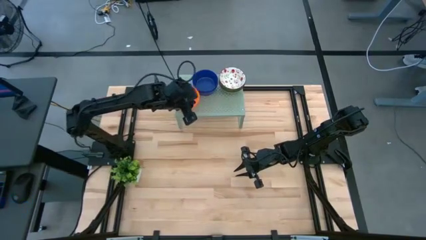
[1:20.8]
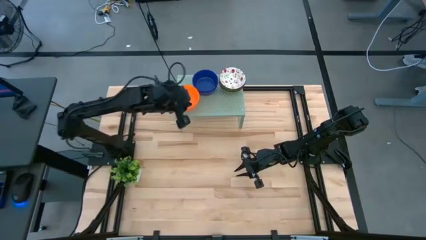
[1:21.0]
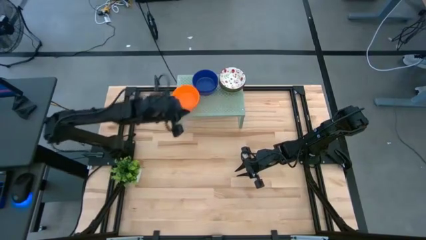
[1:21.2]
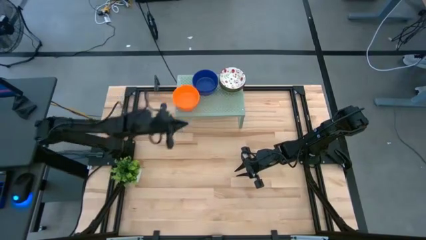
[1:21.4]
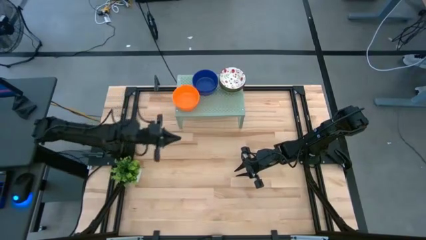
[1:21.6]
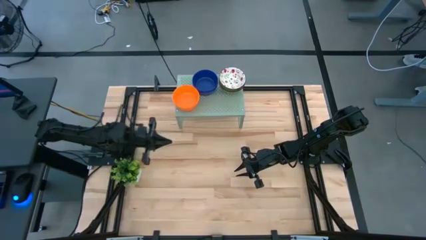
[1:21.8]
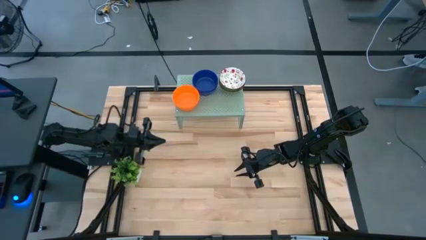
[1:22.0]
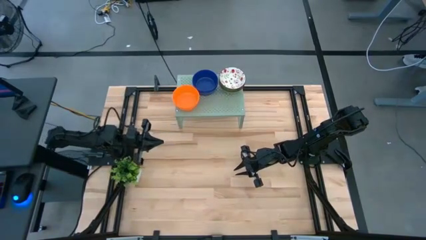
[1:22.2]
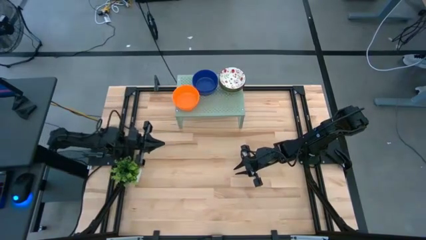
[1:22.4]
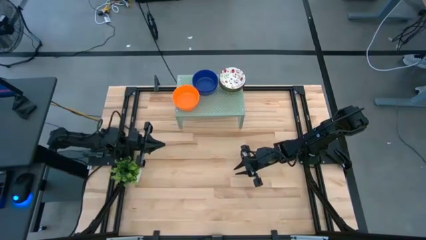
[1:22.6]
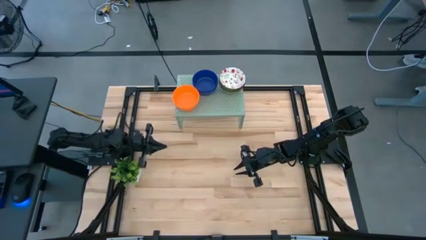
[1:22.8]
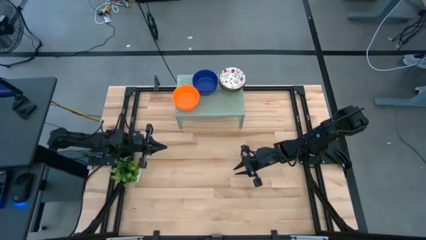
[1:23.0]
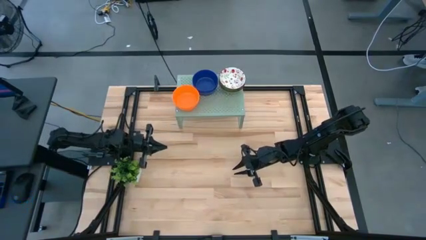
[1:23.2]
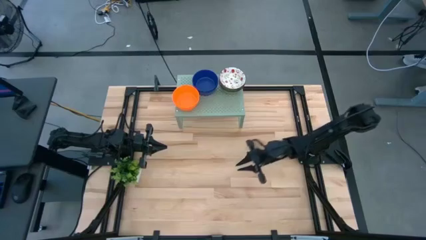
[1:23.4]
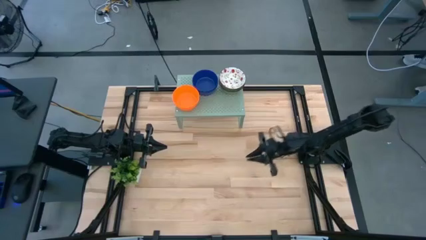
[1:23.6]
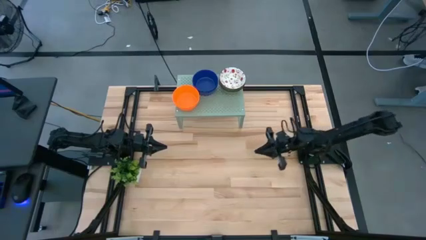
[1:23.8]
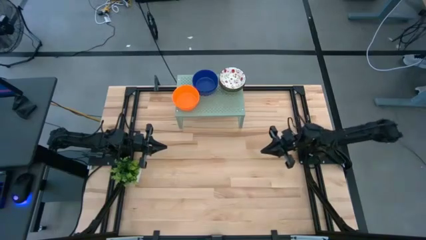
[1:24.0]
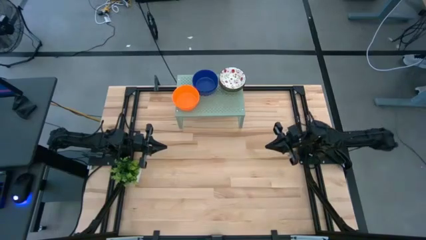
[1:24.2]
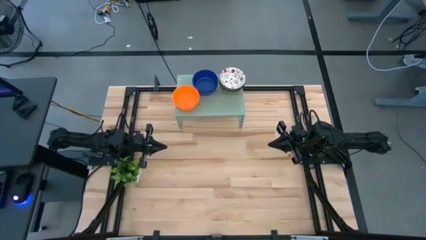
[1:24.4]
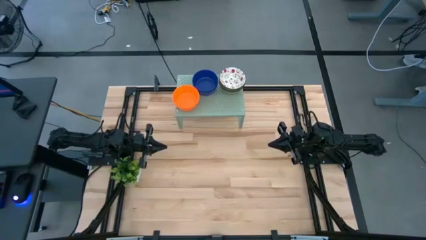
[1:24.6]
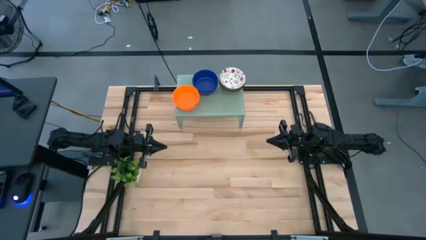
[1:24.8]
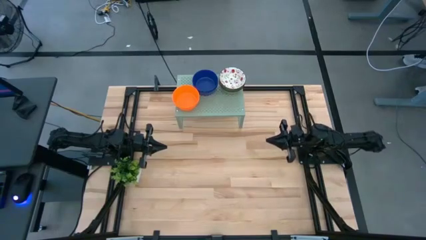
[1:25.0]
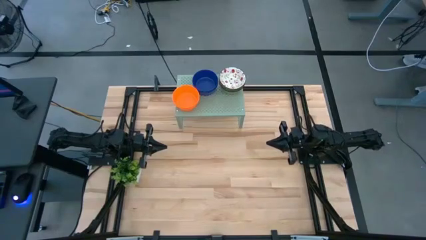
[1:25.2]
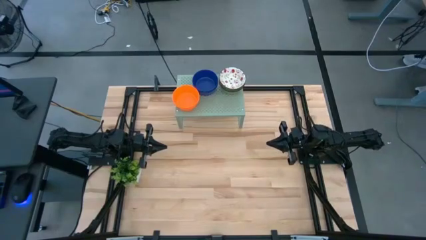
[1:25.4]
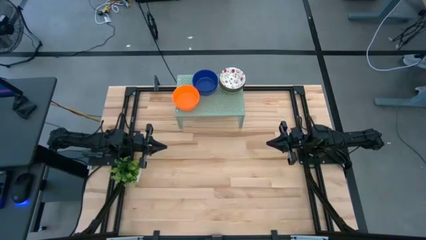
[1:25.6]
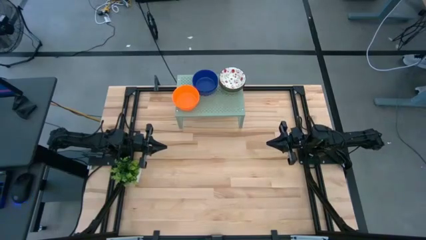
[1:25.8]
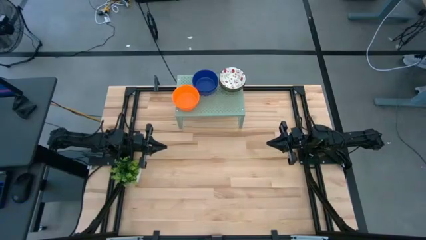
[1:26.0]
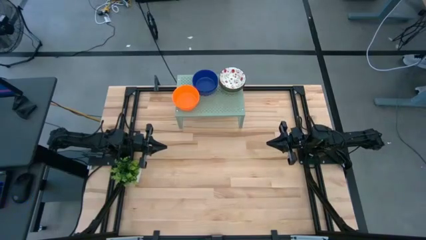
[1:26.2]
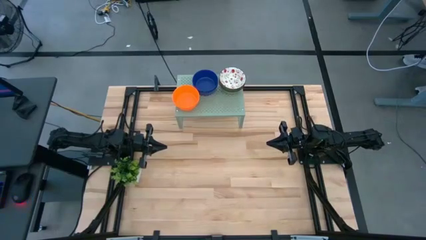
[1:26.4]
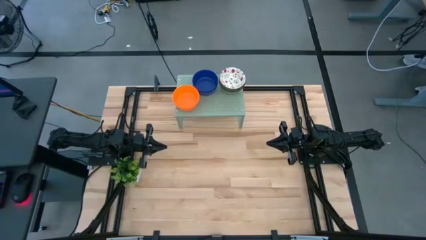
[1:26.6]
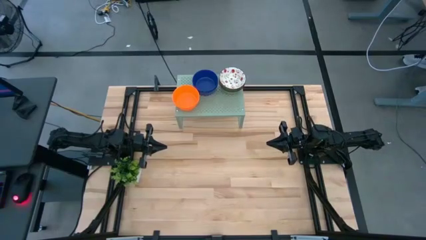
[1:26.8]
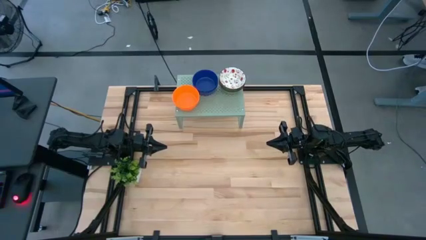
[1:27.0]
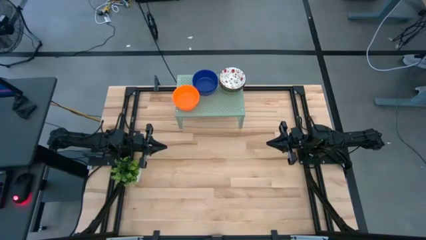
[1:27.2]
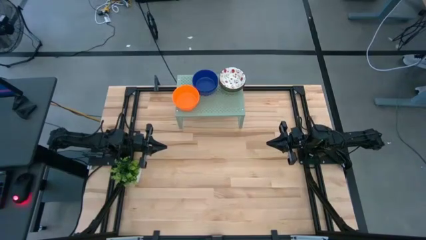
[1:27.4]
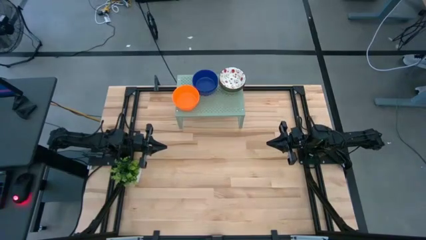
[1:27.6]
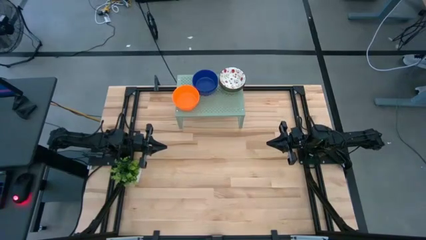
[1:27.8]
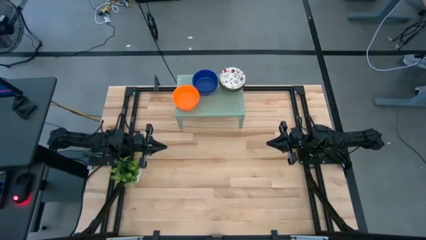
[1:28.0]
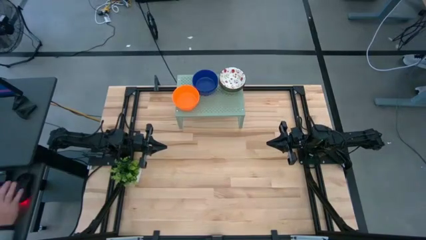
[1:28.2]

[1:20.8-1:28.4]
Task: Pick & Place Mini bowls
Return to Home Position

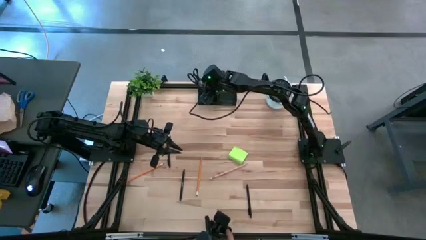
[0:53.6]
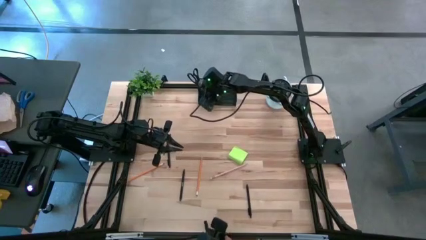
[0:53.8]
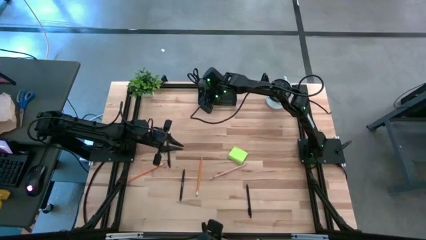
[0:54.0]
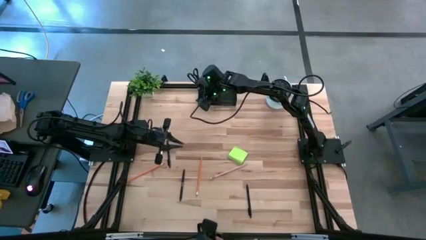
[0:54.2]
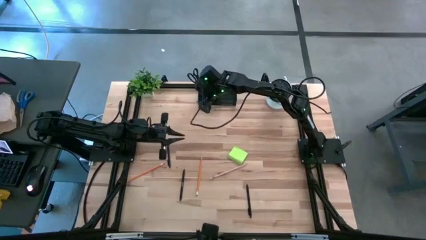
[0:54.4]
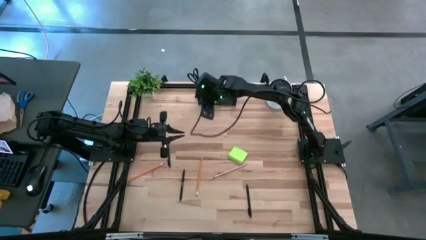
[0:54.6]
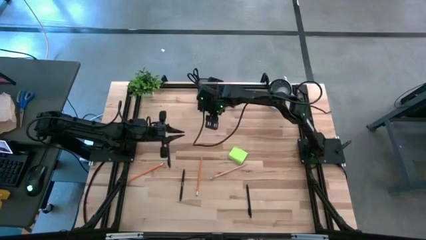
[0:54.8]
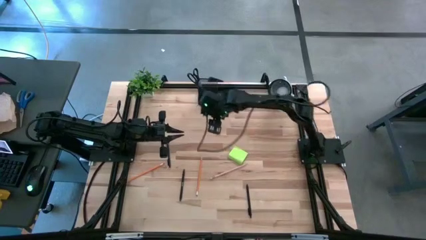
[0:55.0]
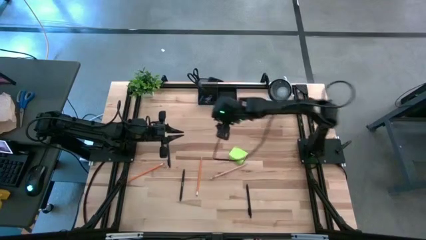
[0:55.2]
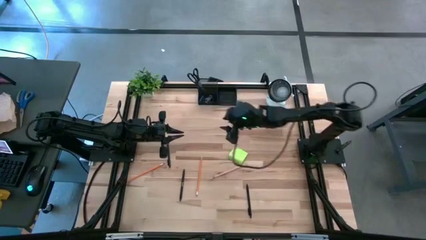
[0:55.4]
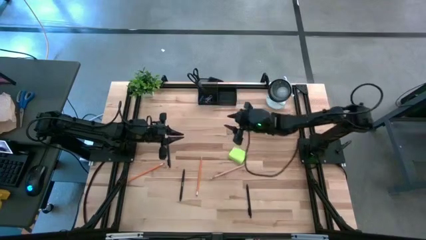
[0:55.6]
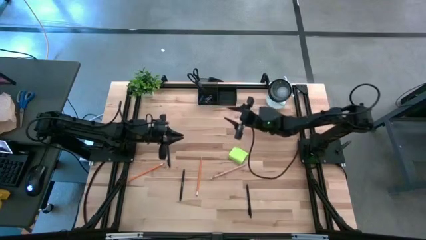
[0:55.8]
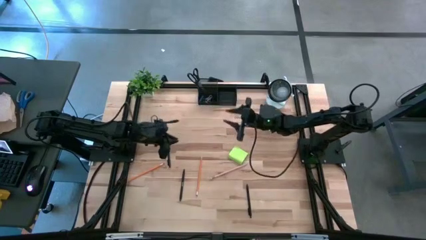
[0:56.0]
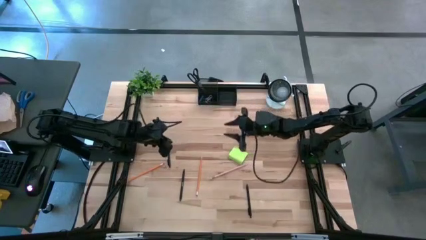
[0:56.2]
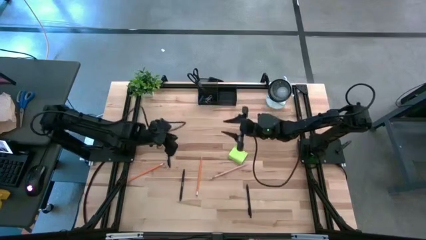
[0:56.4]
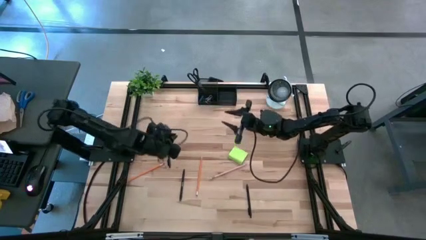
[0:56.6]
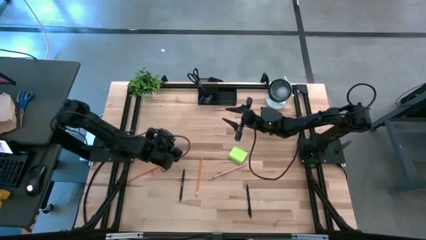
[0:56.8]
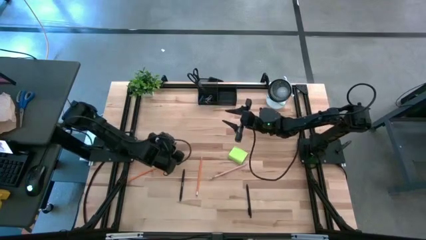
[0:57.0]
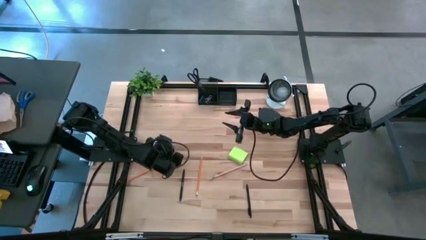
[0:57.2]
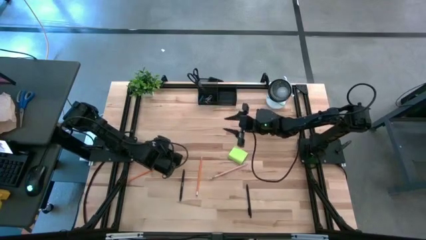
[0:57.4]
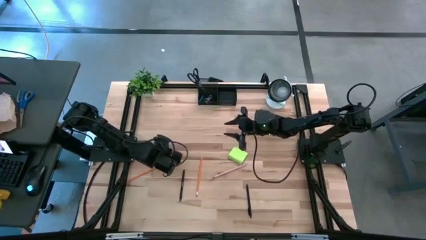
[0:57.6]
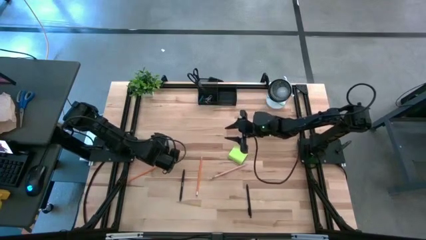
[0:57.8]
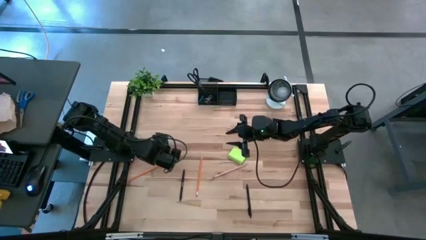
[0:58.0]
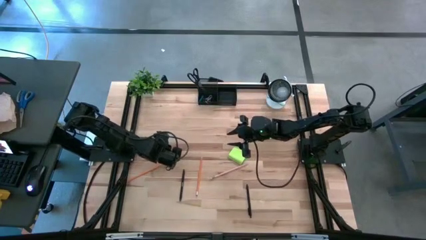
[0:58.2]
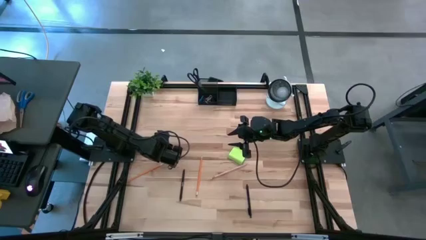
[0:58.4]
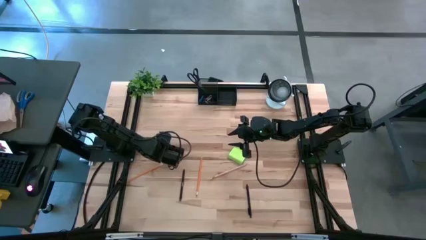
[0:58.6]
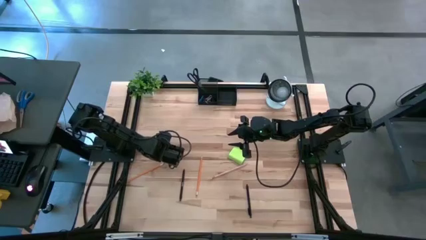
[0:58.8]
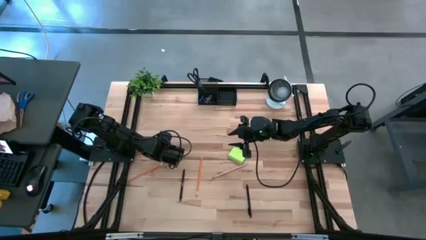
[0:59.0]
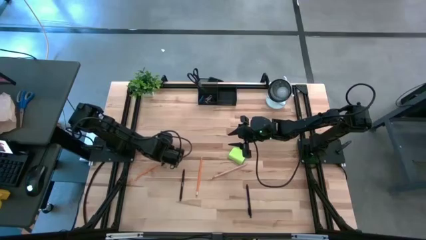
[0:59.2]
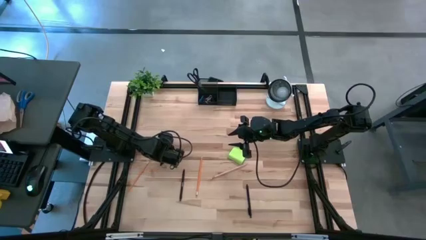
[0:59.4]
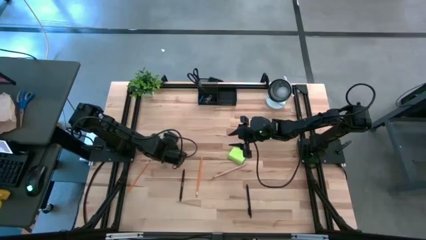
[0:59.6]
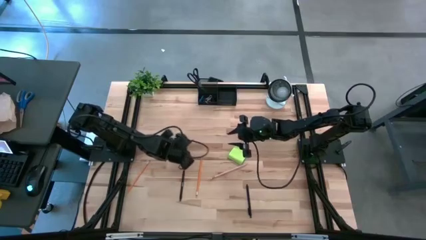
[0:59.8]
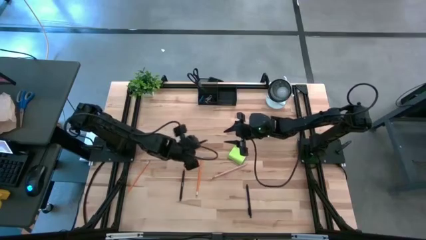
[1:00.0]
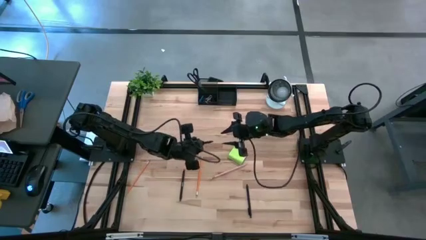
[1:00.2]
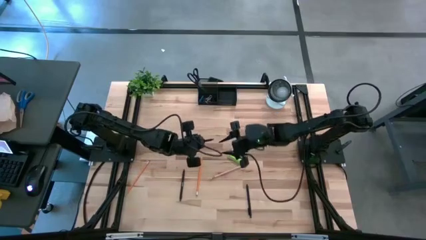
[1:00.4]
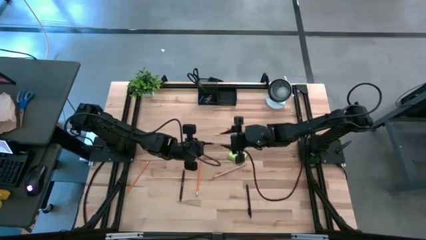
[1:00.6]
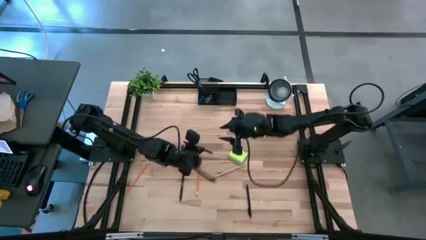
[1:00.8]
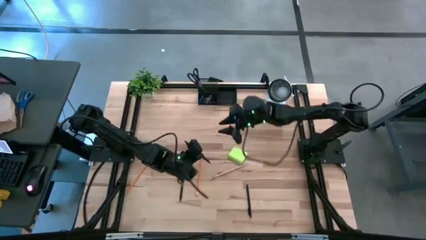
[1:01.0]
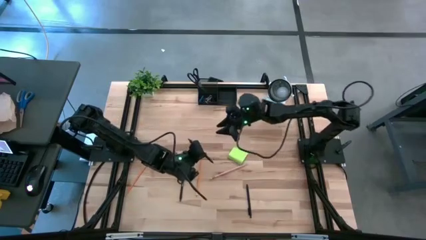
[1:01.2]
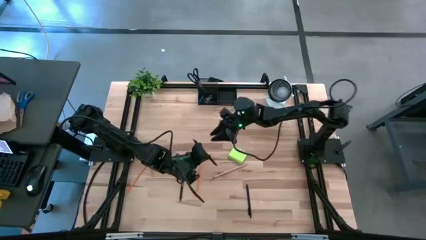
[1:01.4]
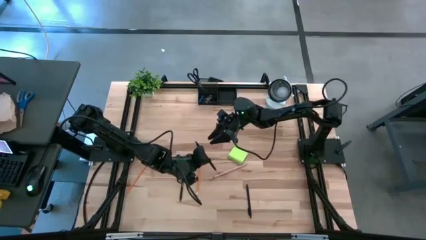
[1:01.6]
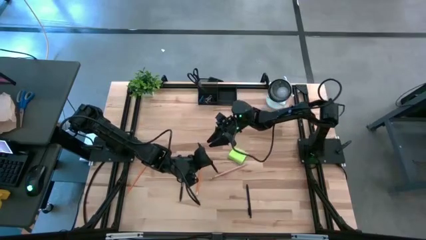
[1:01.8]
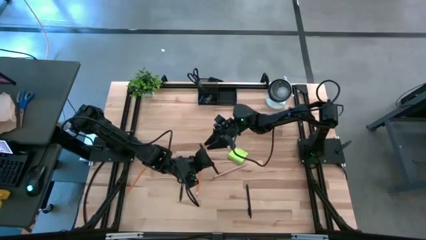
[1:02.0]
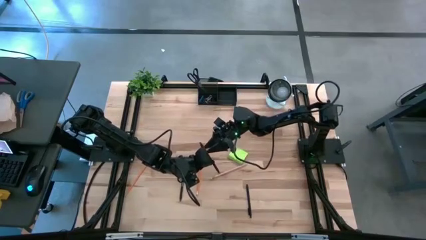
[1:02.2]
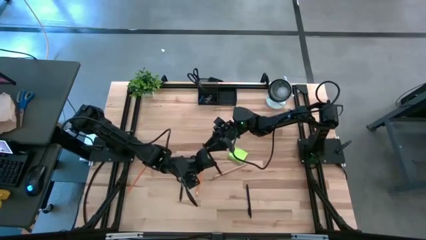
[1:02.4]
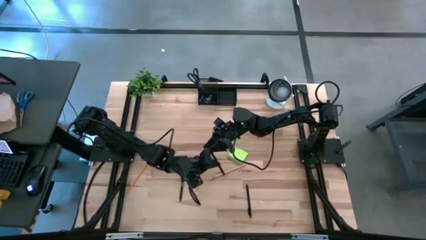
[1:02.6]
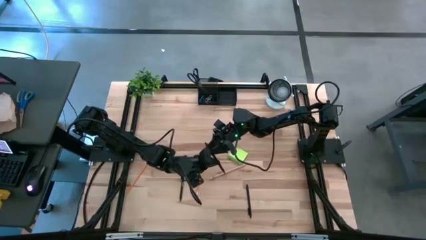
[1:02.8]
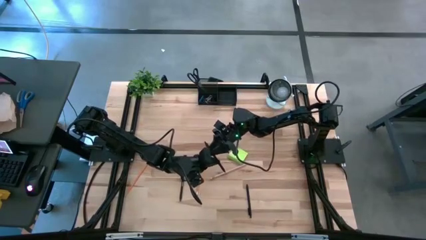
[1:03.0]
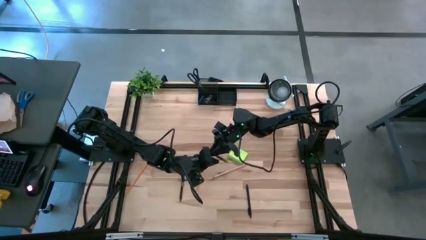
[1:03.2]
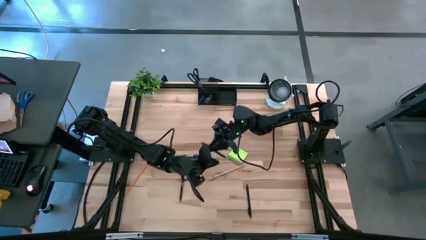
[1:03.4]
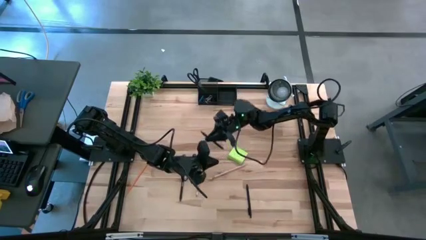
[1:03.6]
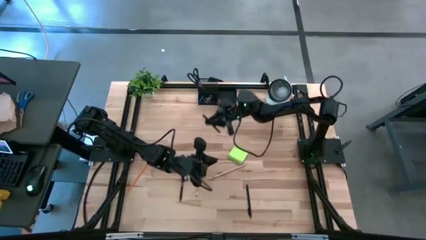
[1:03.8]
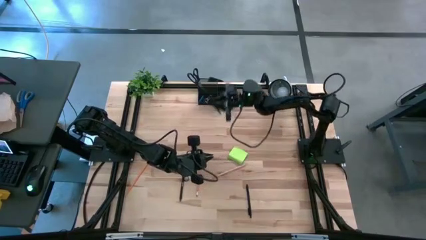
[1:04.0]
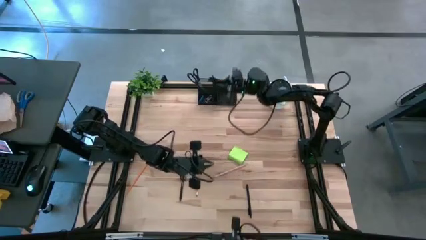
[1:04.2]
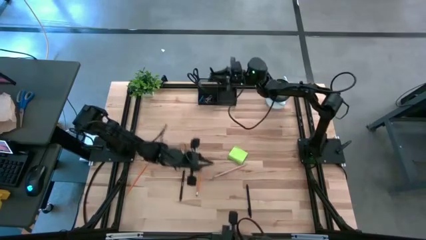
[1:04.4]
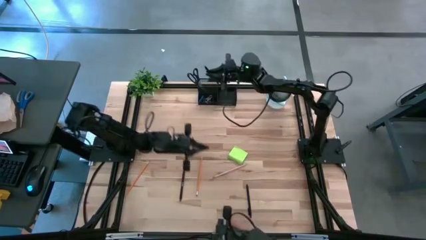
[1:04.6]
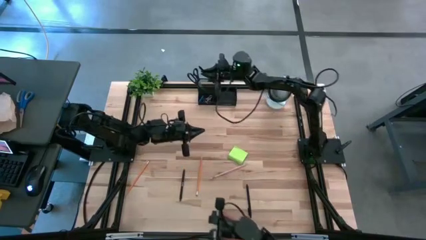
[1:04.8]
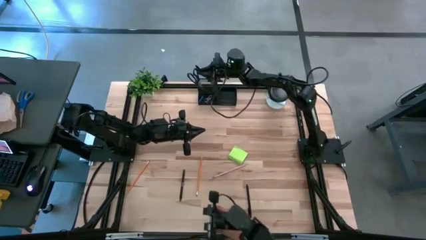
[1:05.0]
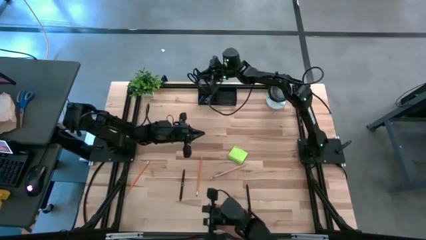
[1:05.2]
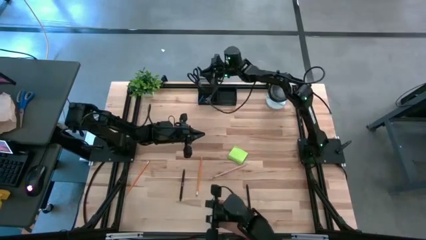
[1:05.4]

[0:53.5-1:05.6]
Task: Pick and place office supplies into organizer
Put the top black pen into the black desk organizer
